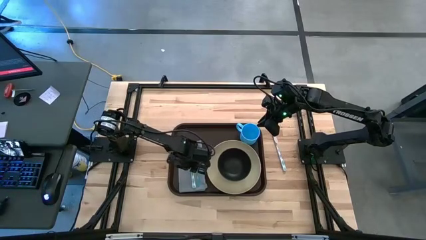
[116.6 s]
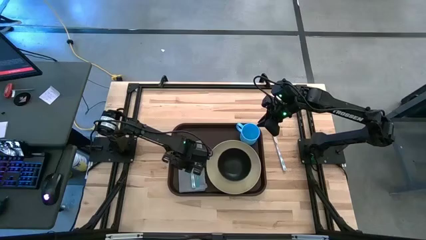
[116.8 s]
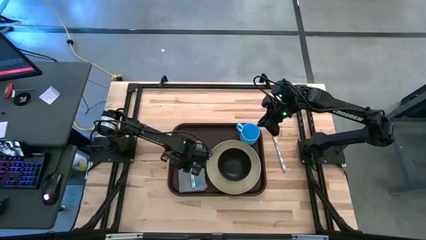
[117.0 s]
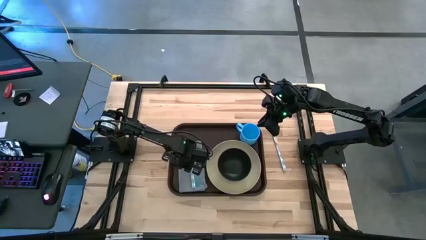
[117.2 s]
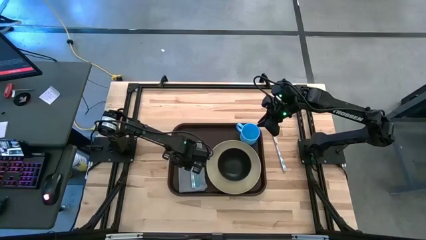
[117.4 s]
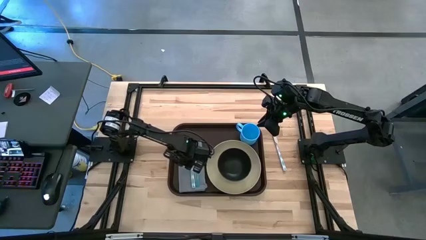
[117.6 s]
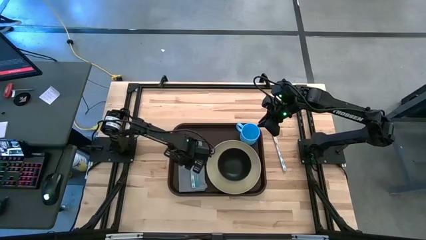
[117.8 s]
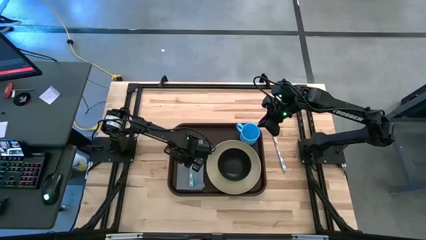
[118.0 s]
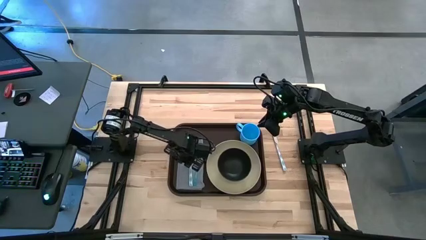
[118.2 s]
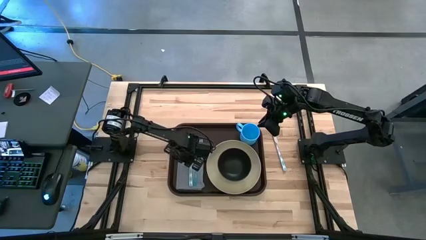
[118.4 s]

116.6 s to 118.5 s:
Task: Set up tray
Adjust the gray napkin

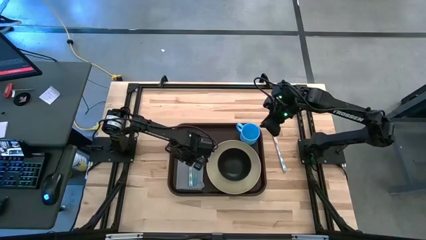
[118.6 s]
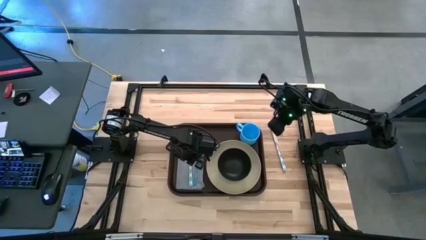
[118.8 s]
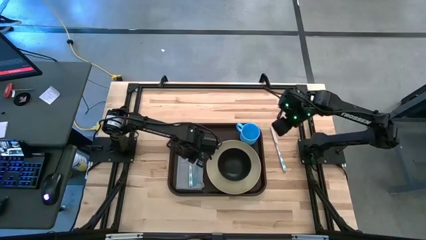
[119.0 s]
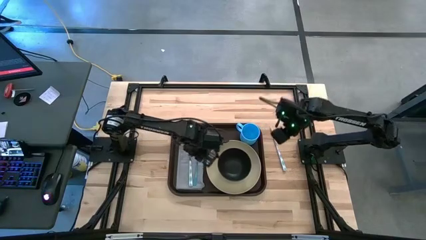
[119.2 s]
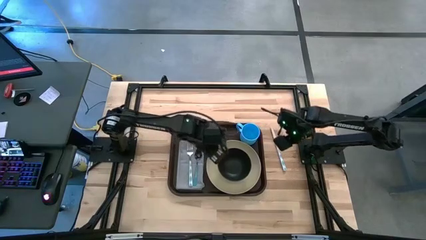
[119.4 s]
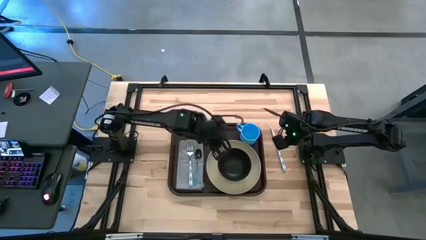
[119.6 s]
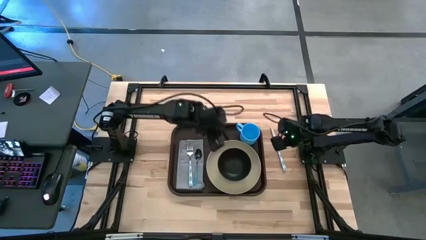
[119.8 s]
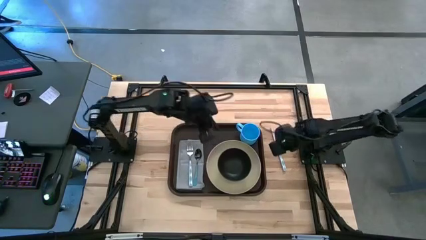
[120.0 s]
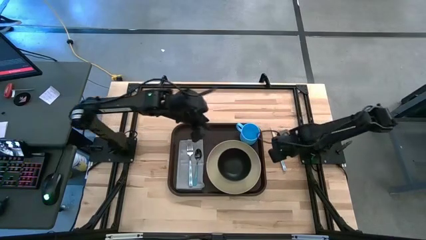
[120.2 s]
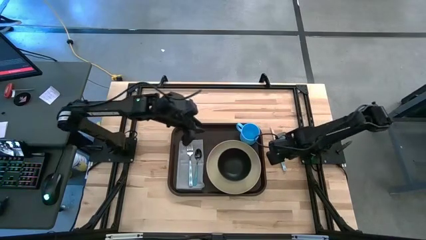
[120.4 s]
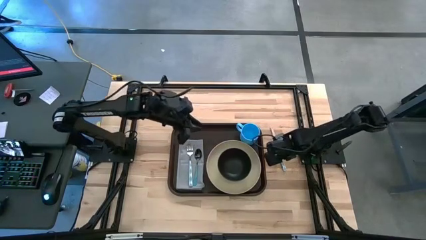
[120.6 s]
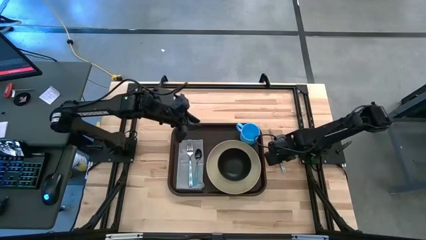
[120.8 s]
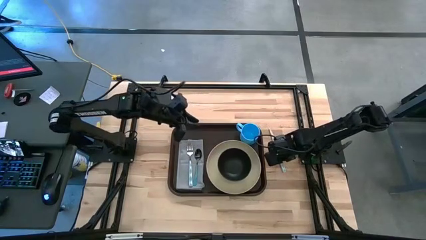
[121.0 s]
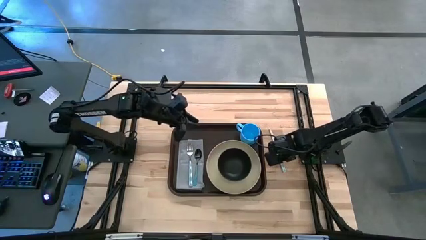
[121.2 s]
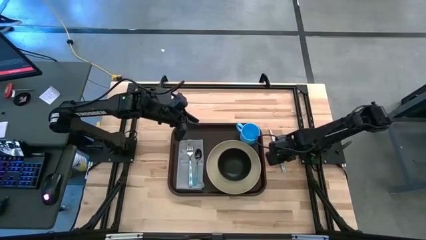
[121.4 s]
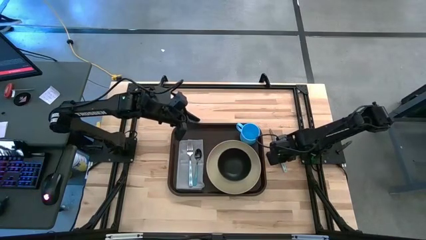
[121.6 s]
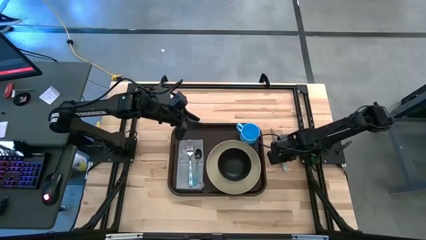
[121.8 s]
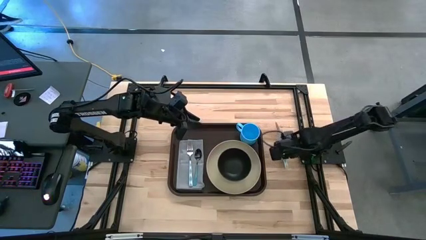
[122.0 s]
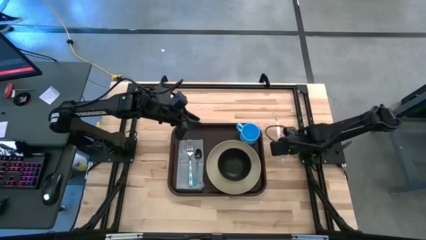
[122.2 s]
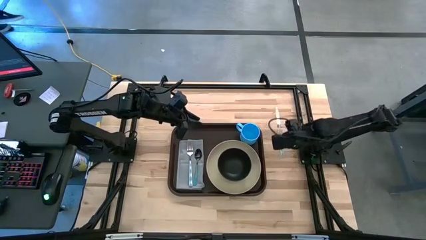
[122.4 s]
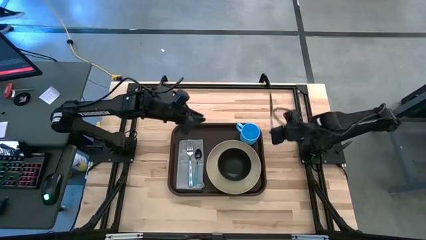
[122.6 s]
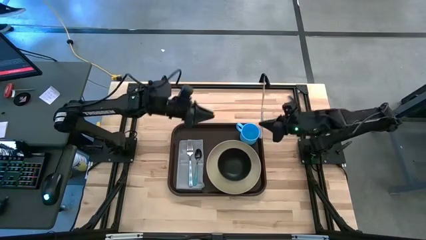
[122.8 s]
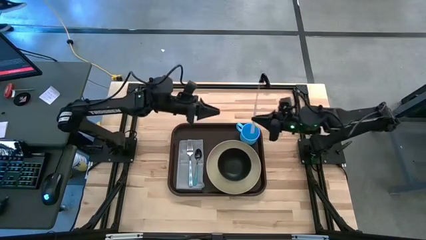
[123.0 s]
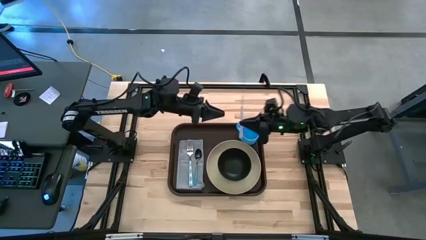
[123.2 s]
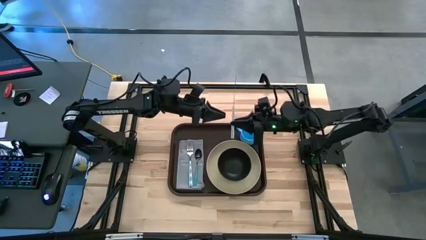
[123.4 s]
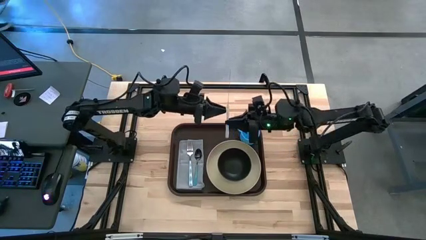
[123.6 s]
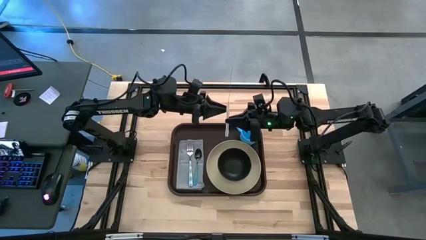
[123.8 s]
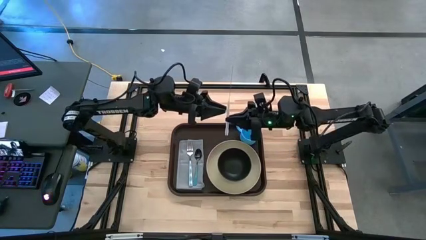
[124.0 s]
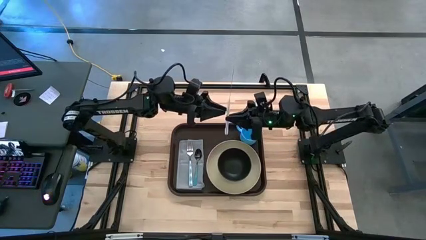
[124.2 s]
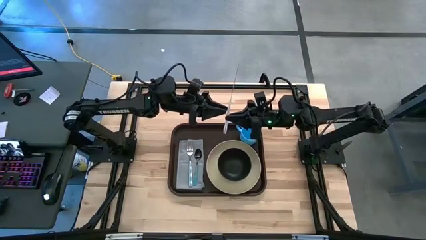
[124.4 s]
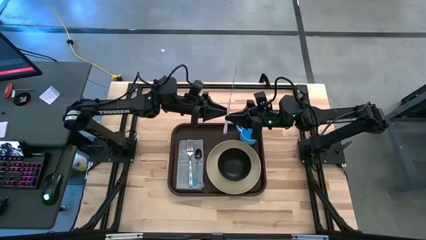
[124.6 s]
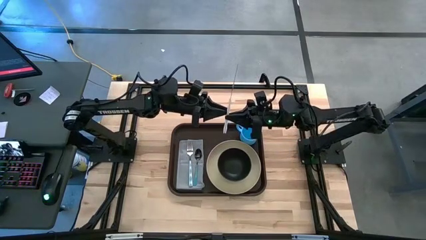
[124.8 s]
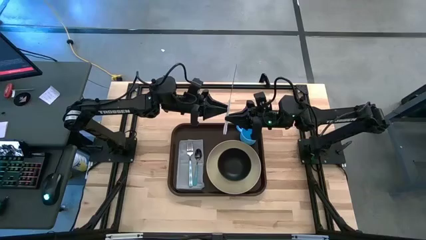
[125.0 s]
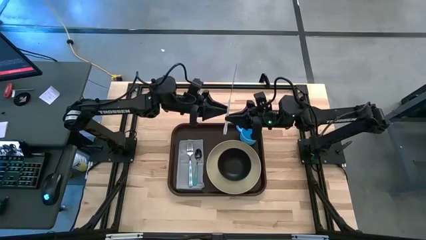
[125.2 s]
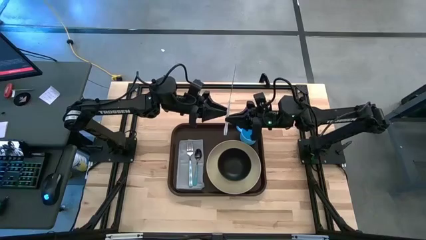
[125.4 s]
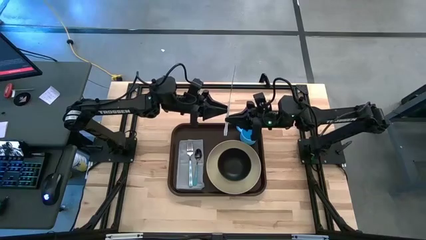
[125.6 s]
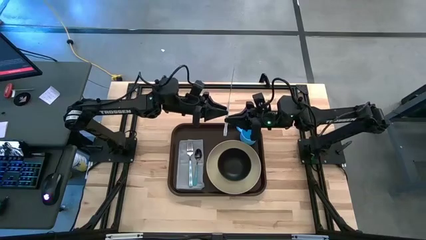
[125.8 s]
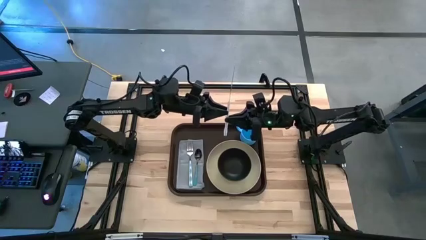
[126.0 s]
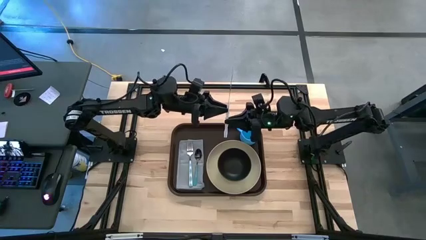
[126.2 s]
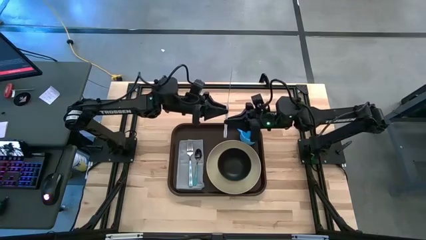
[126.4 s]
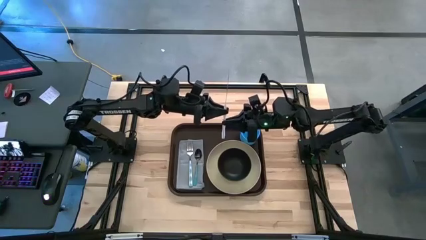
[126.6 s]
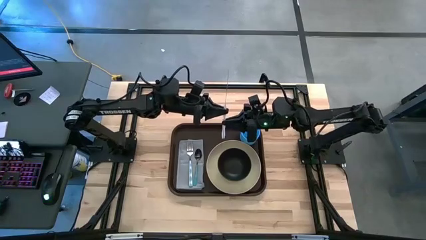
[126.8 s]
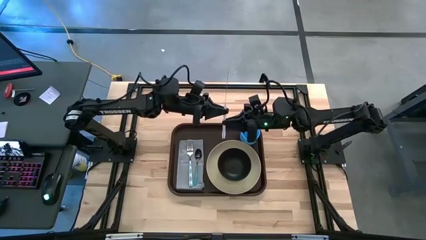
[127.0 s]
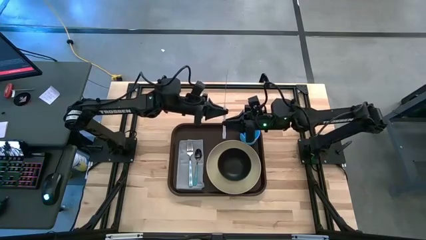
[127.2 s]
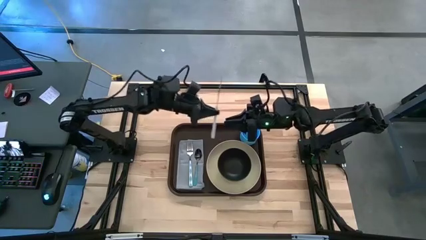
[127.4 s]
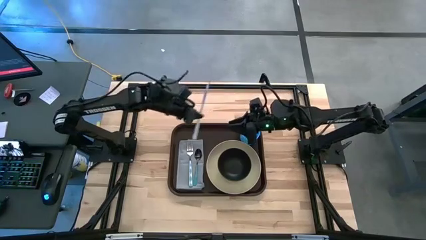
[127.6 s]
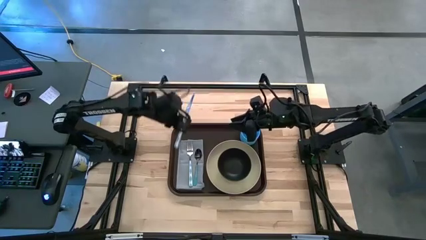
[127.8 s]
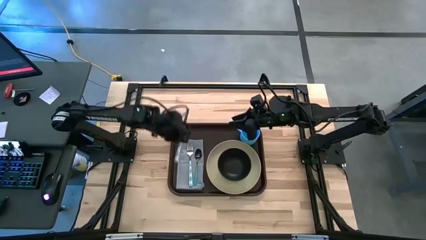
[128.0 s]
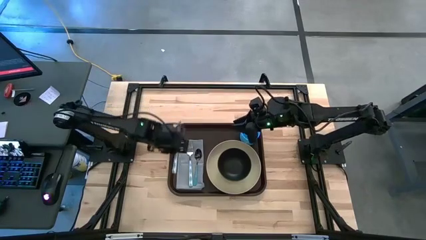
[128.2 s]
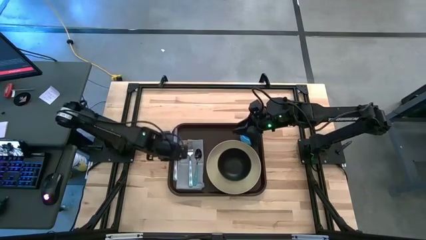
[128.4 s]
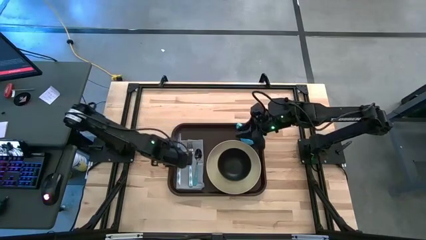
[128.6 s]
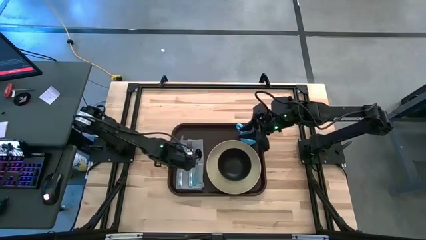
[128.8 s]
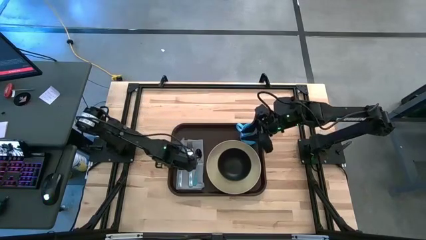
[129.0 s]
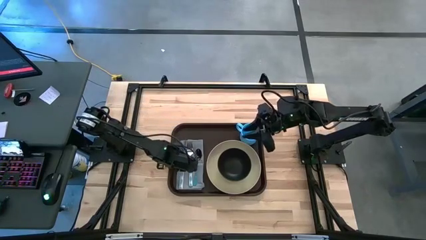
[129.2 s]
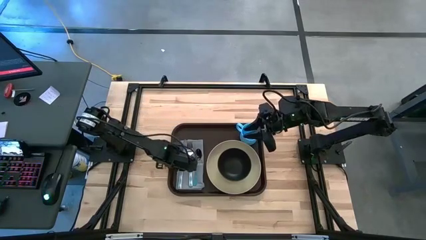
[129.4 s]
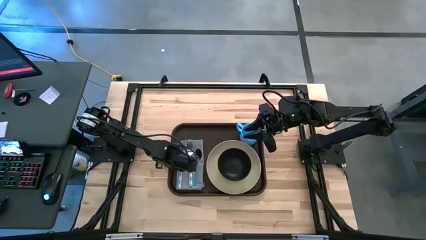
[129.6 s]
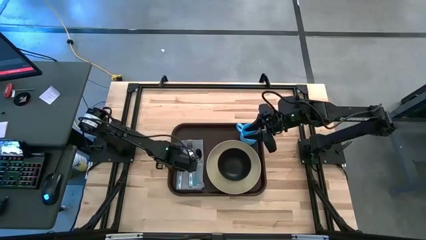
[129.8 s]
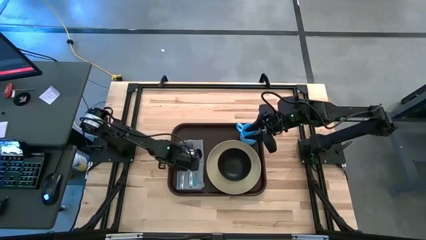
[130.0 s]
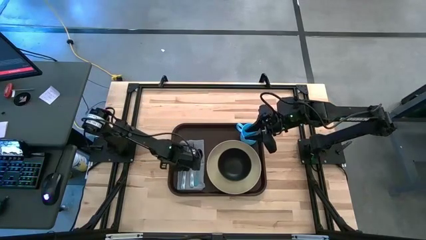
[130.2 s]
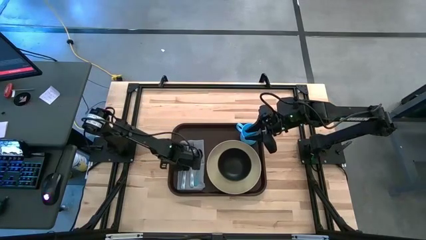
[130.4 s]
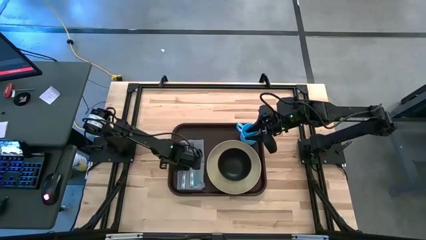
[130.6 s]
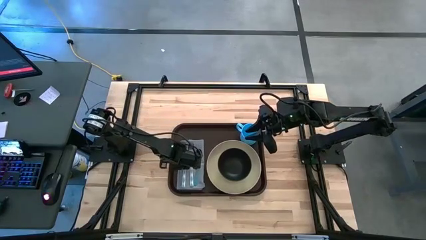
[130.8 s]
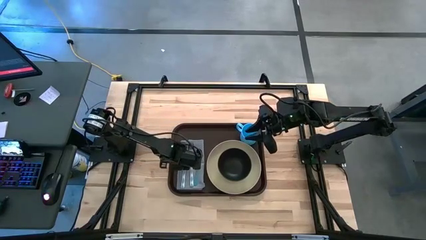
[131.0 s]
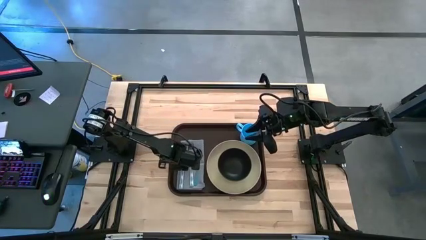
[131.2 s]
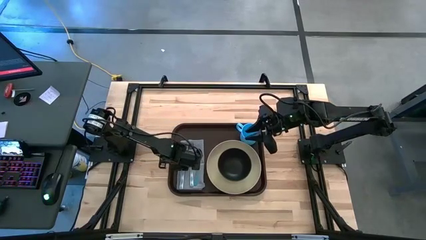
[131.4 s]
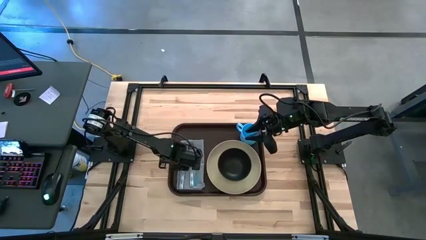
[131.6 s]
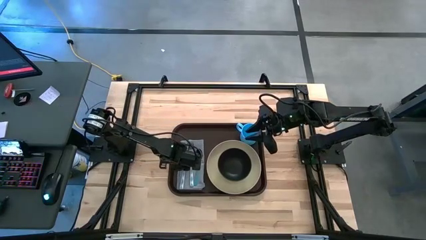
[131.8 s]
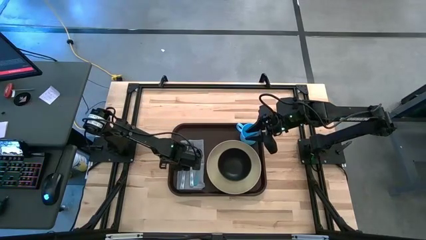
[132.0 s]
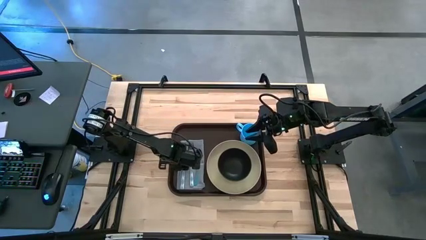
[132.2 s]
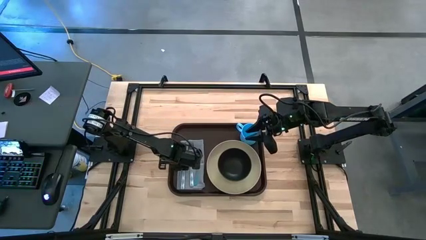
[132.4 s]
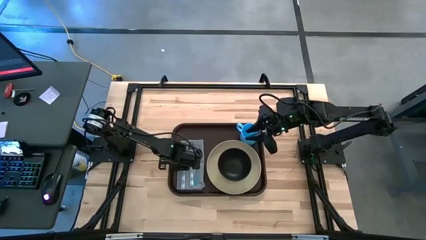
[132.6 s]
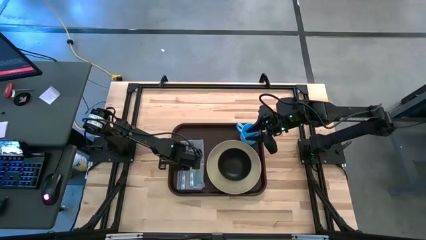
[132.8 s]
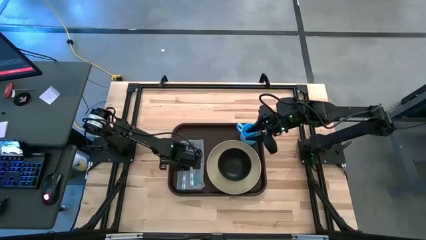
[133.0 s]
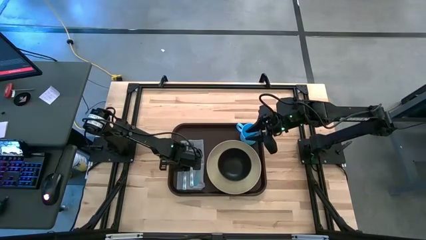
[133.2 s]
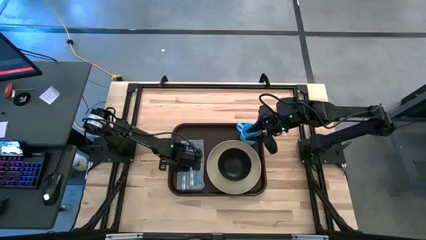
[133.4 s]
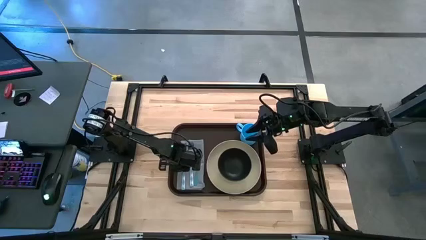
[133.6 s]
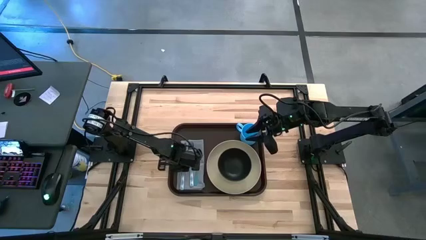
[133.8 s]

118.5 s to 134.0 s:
Put the blue patterned knife on the gray napkin to the left of the blue patterned fork

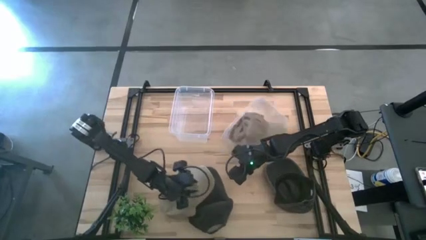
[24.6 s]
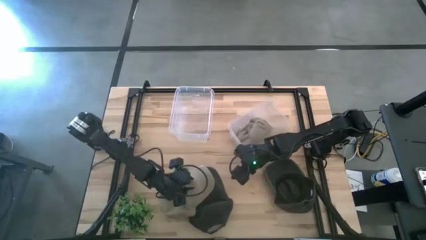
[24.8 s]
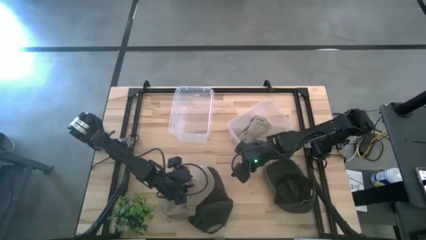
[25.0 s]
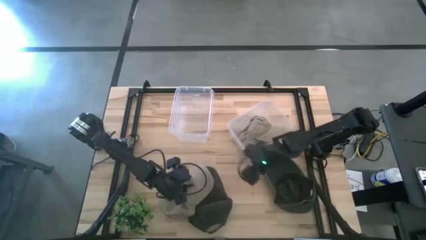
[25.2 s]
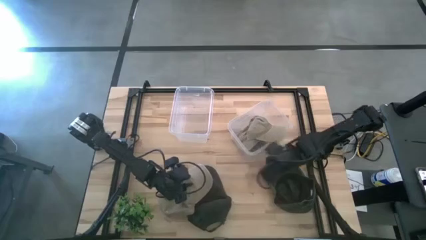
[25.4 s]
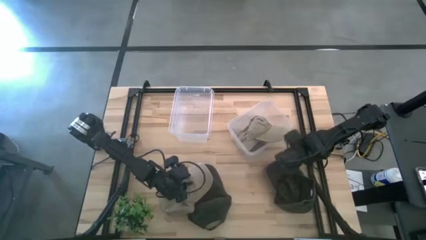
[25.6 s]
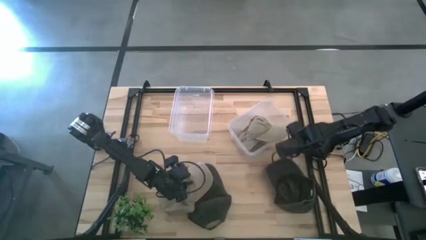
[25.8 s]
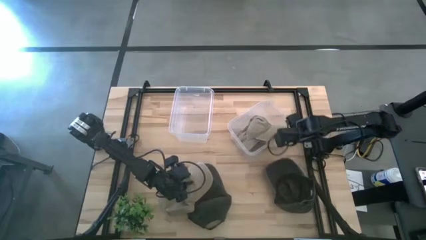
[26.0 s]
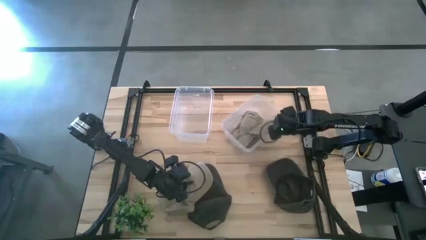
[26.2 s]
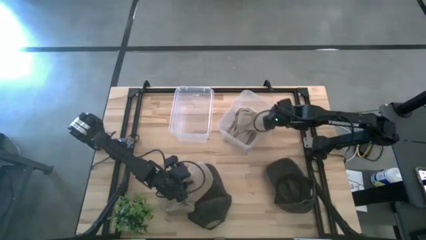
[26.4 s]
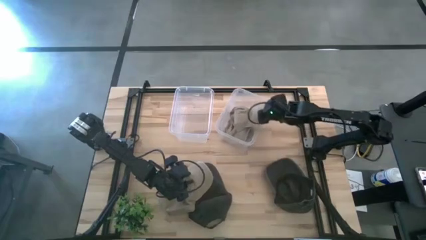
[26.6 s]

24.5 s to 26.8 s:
Task: Pick & Place hat
Adjust the right transparent bin
